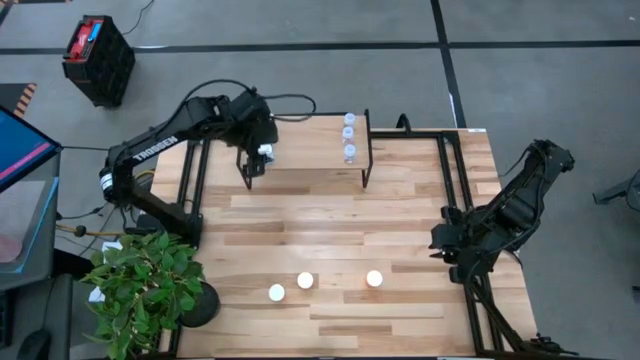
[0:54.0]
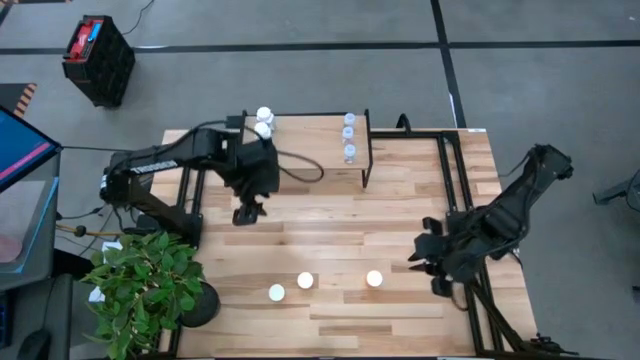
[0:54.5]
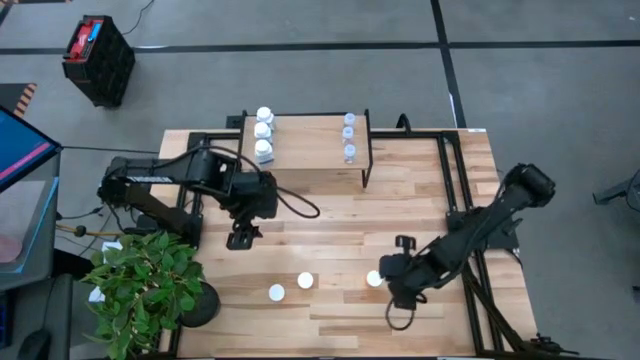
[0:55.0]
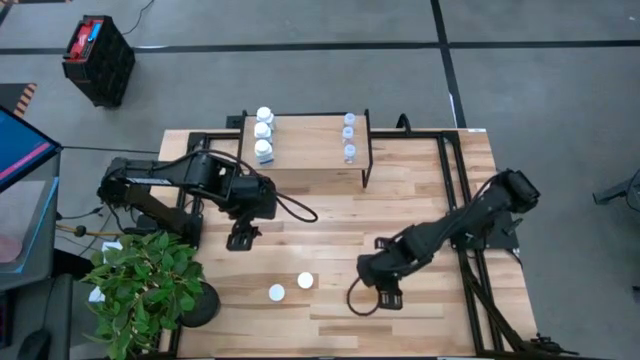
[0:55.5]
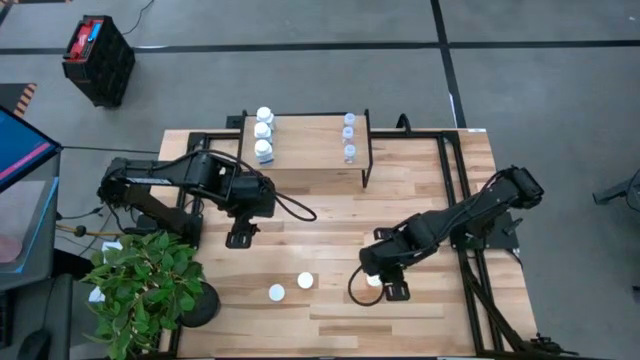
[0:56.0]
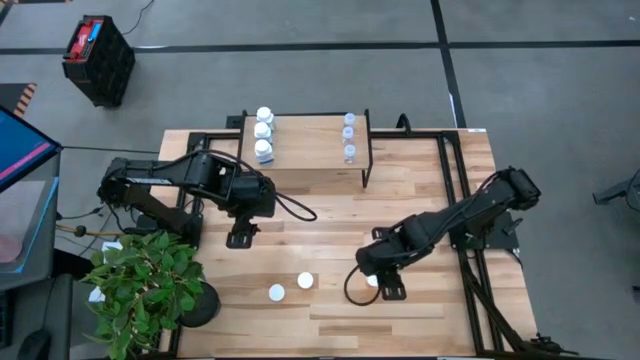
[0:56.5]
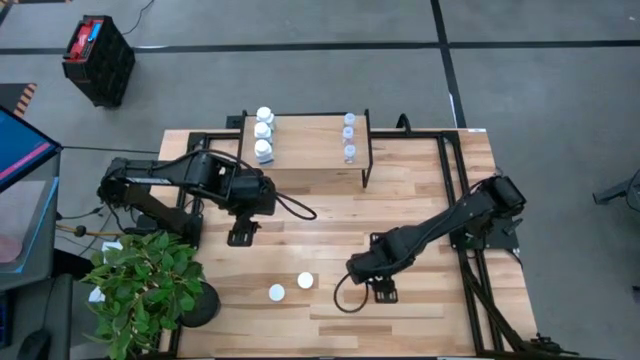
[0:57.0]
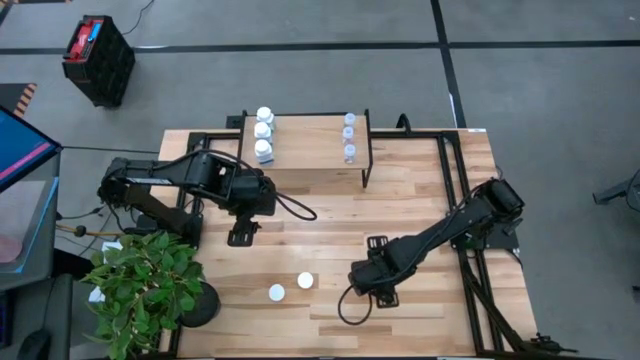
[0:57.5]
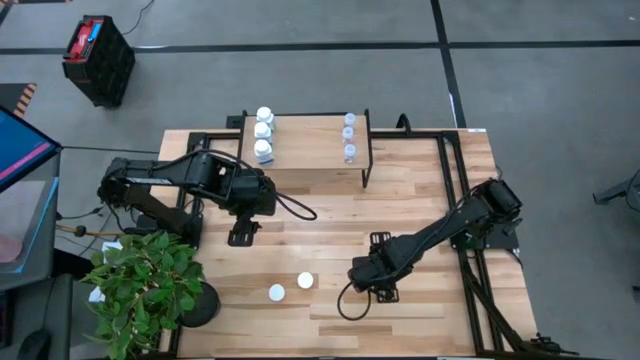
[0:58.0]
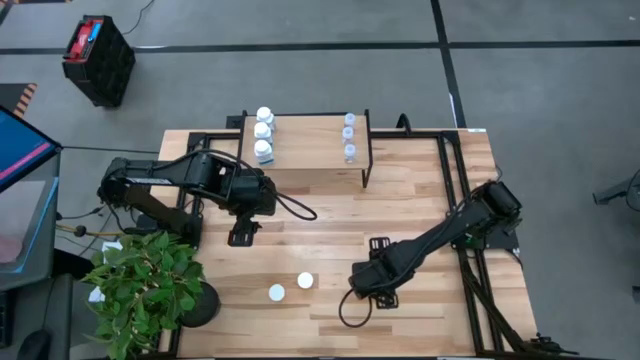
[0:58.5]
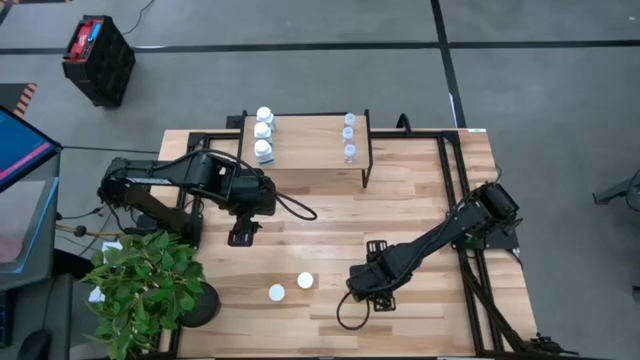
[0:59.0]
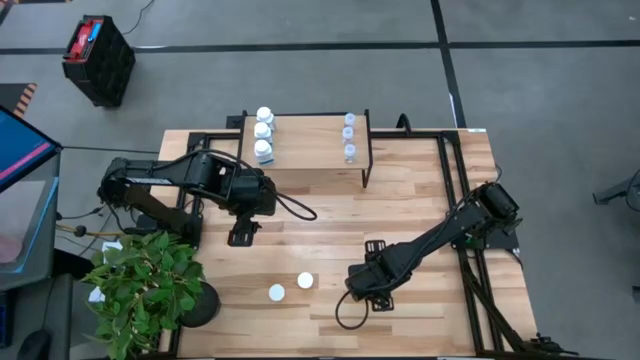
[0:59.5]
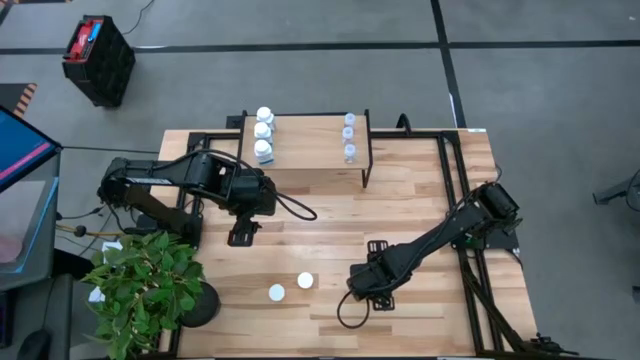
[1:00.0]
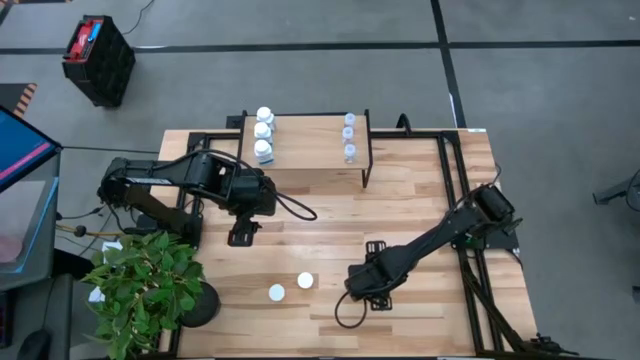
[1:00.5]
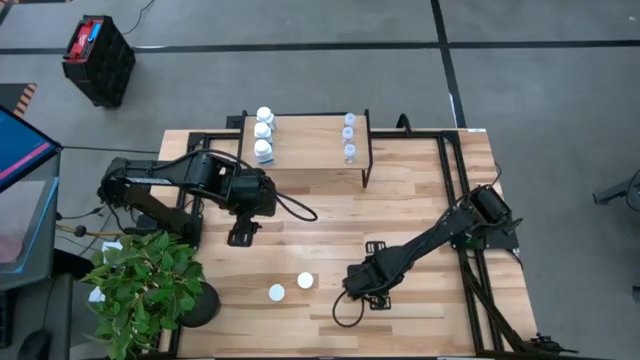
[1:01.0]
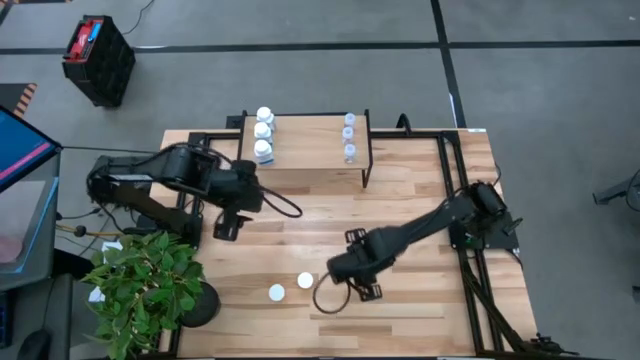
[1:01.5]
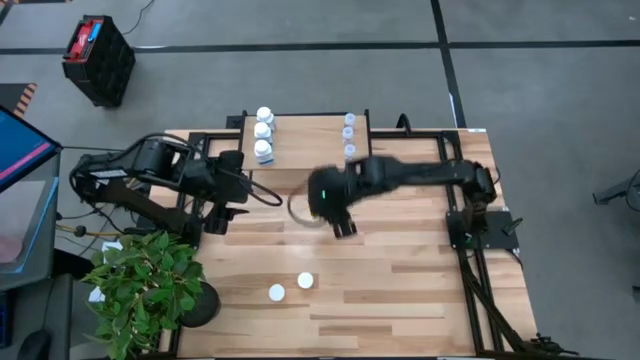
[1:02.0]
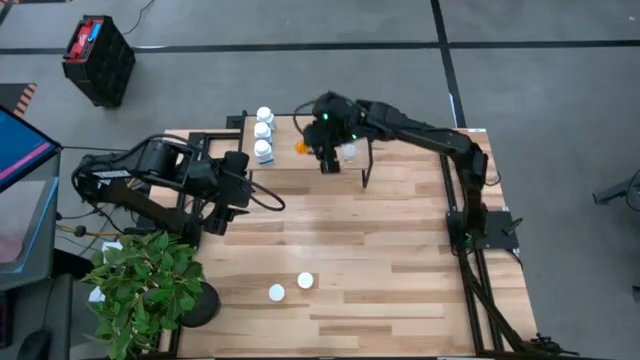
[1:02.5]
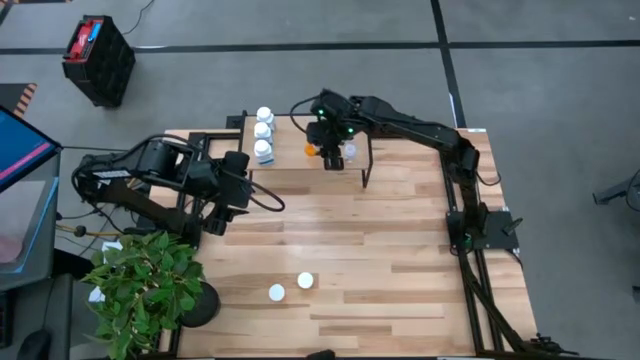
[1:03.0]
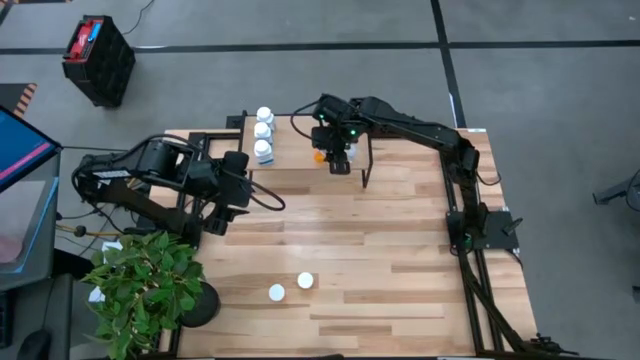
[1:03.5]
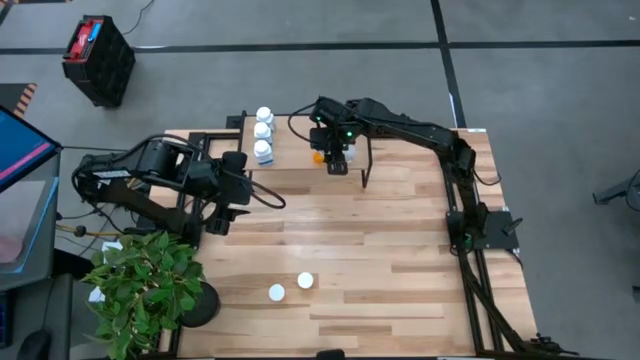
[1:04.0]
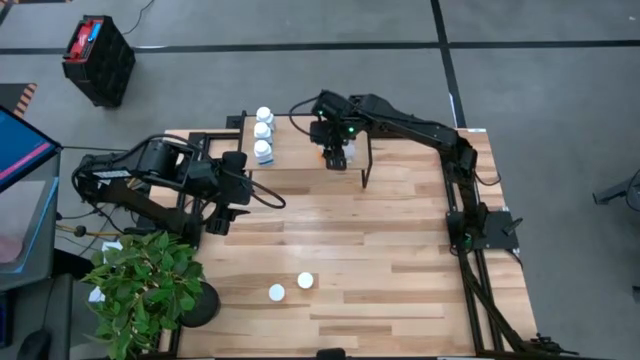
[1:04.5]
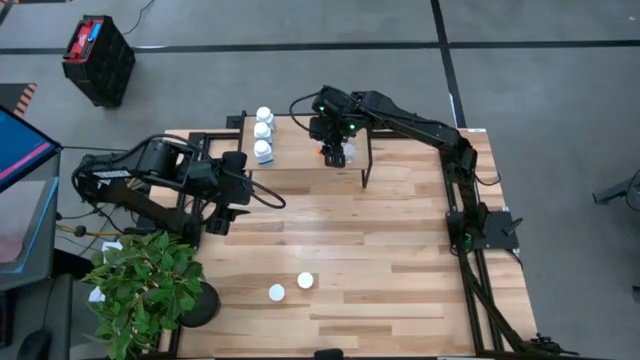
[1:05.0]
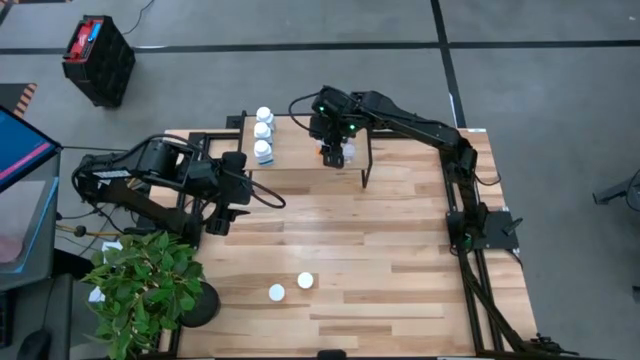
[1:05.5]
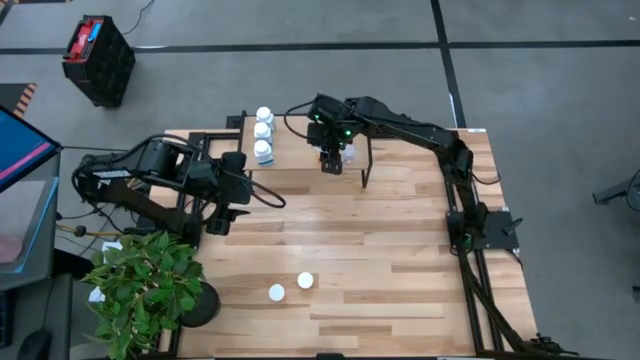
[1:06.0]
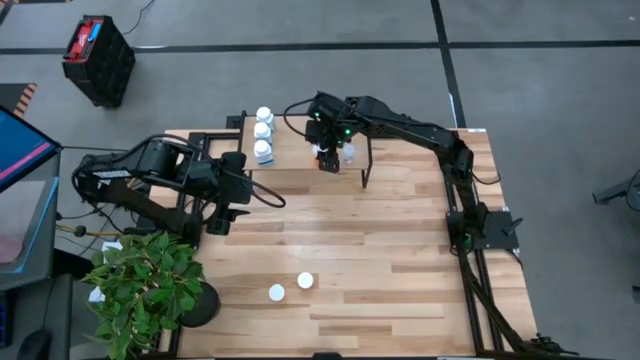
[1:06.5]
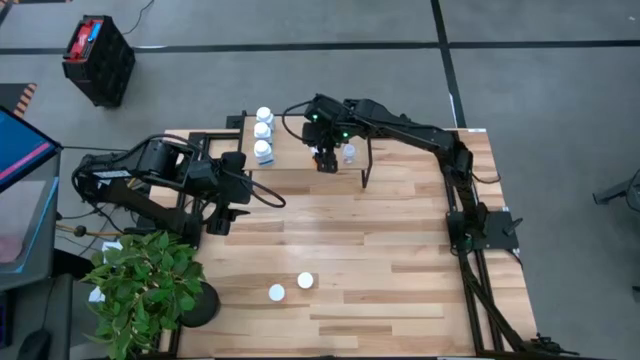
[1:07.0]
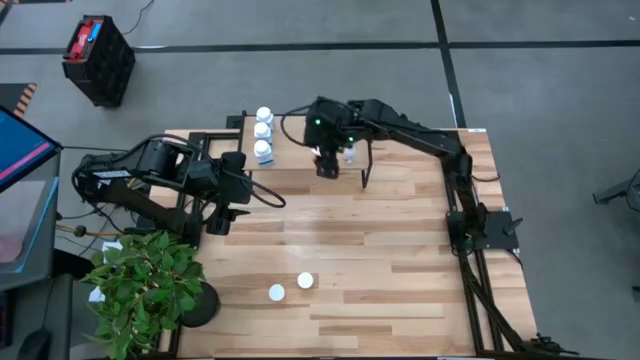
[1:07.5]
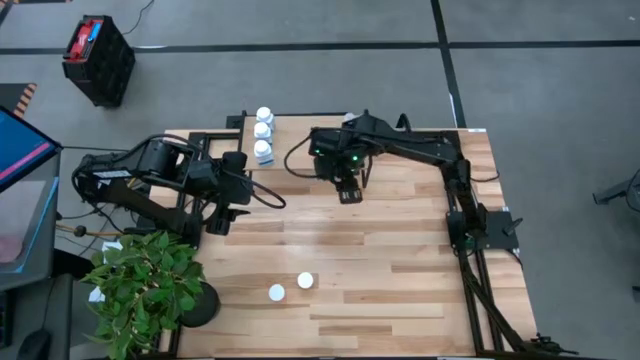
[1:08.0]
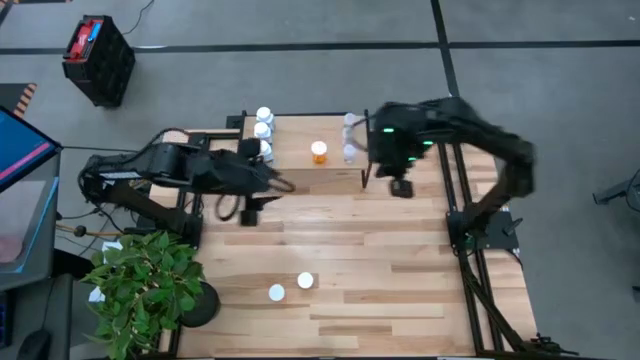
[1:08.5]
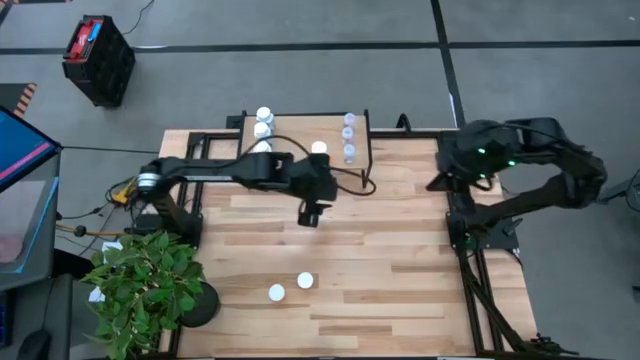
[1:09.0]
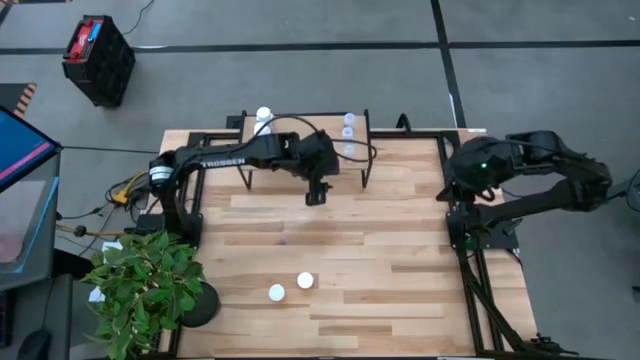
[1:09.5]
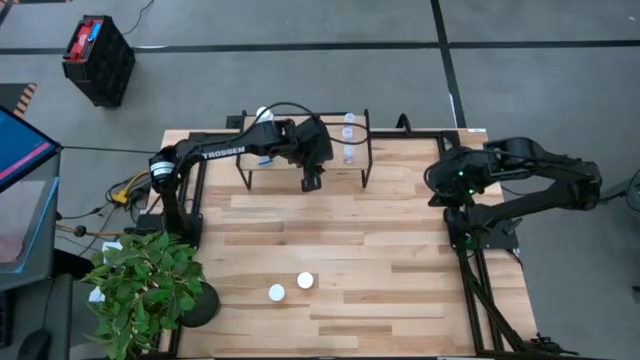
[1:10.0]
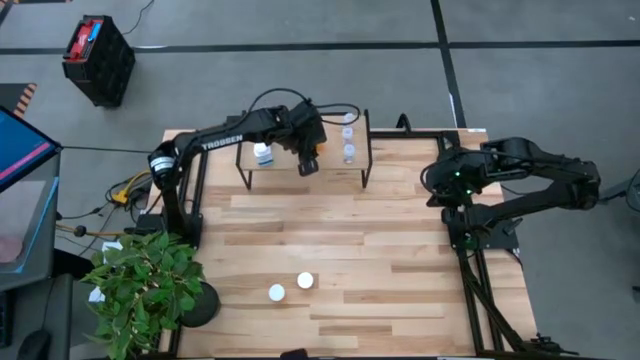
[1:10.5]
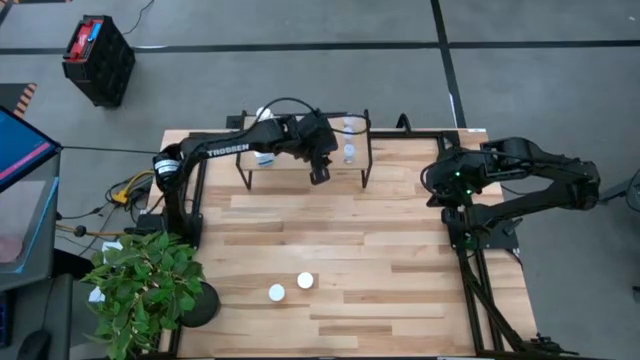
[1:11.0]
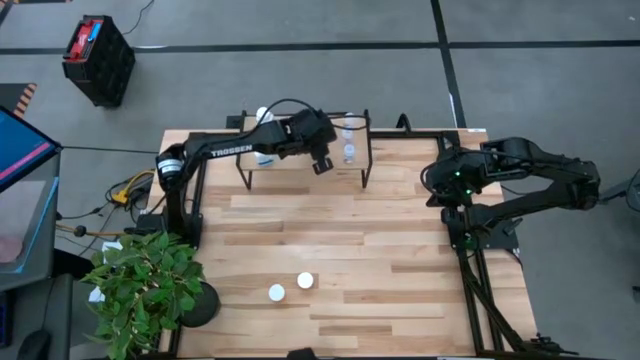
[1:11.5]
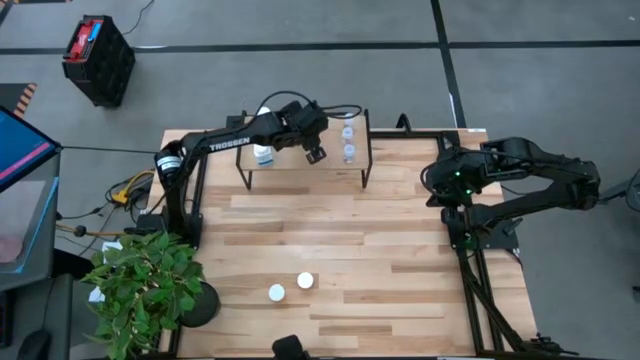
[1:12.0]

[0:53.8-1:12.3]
Task: Pick and place medicine bottles onto shelf by color
Put the right orange pill bottle on the shelf
